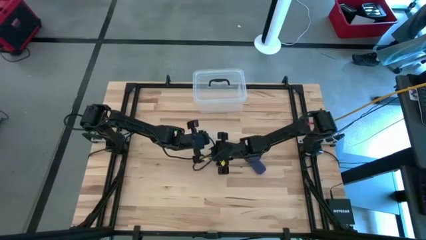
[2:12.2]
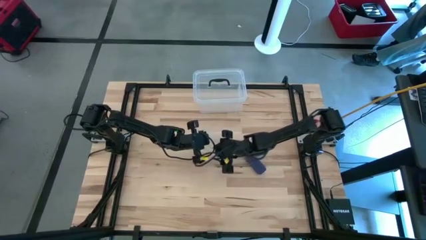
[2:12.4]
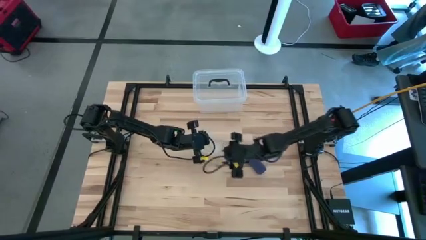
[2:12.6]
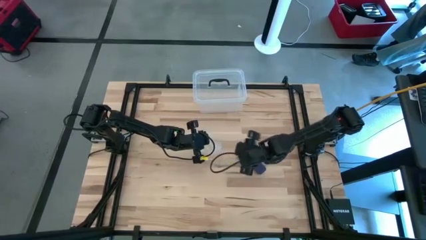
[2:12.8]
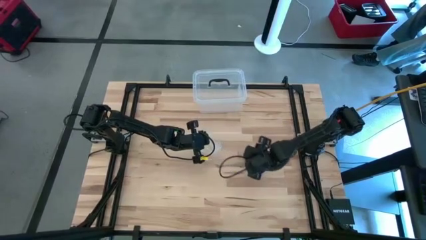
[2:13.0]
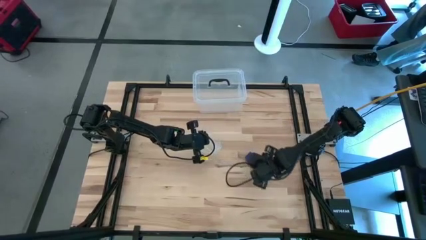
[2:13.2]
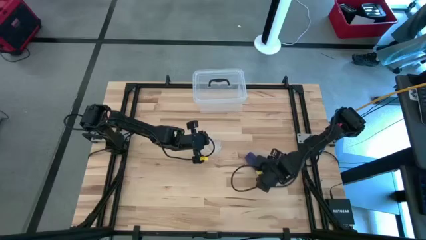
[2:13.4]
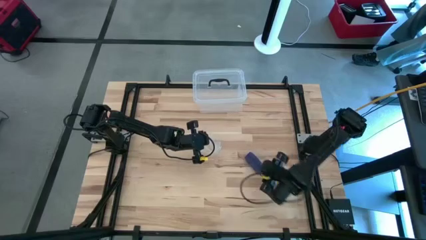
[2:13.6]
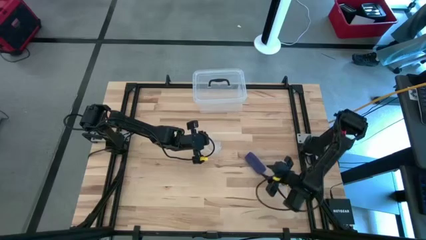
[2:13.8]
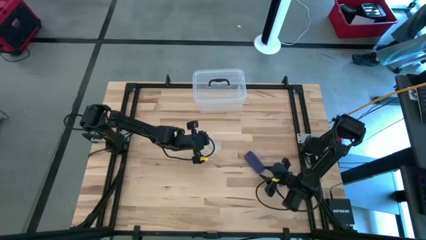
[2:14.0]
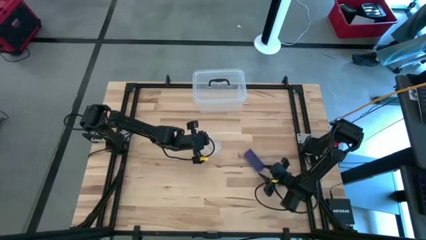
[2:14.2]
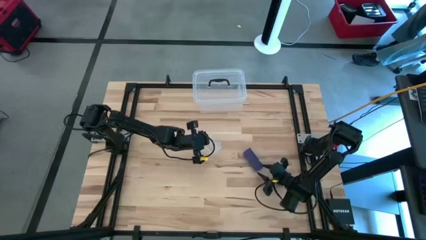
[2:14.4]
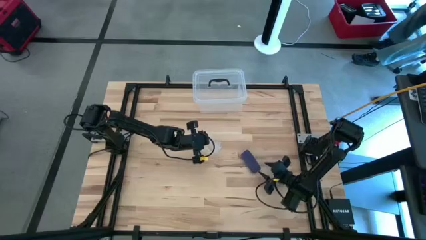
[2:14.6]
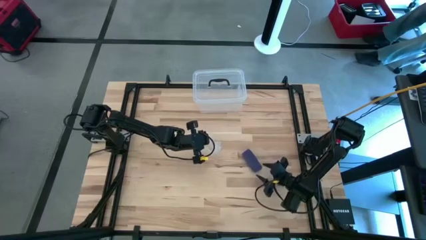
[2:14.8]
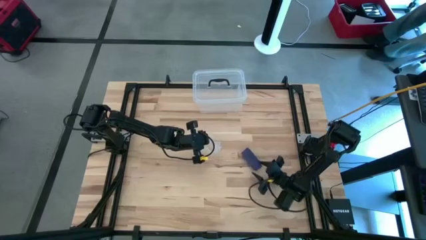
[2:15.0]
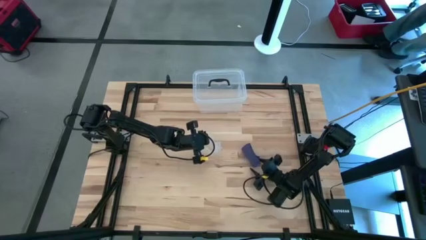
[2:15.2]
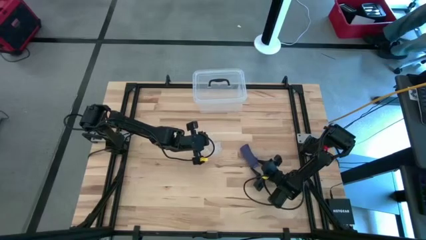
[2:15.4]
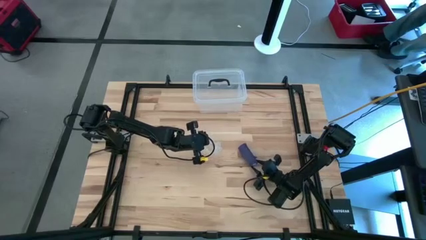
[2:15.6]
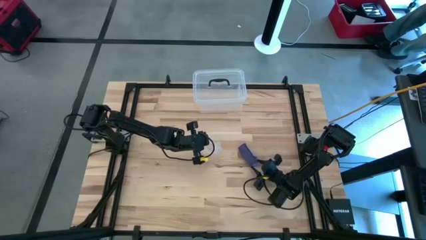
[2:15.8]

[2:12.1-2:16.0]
Task: Roll bandage
Put the violet bandage into the transparent zip bag

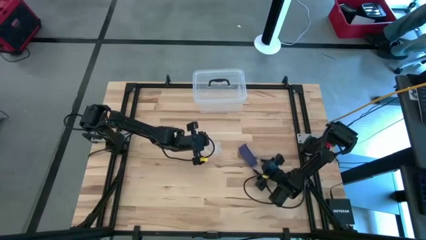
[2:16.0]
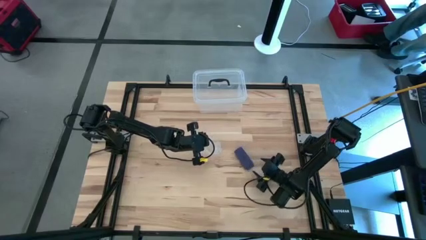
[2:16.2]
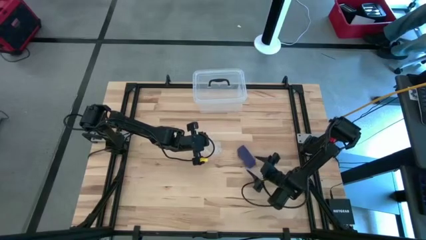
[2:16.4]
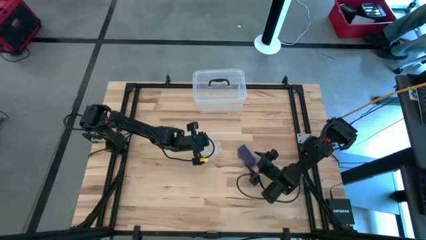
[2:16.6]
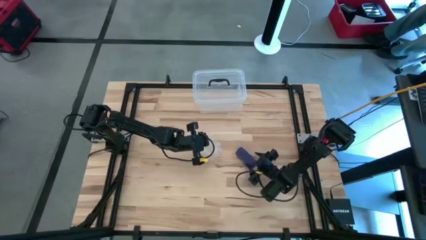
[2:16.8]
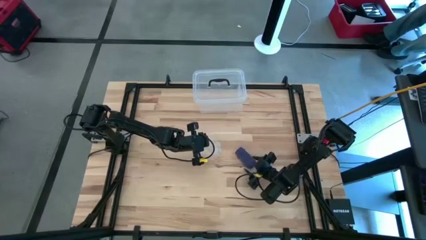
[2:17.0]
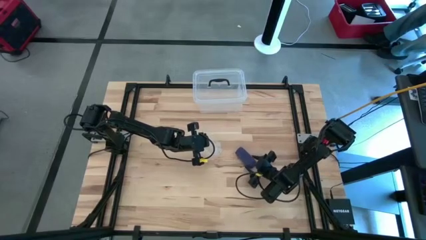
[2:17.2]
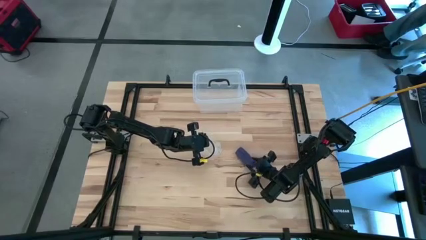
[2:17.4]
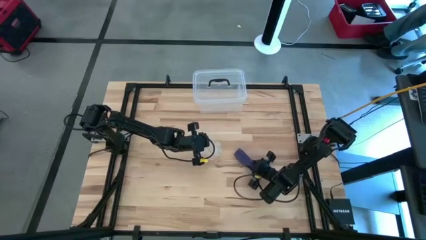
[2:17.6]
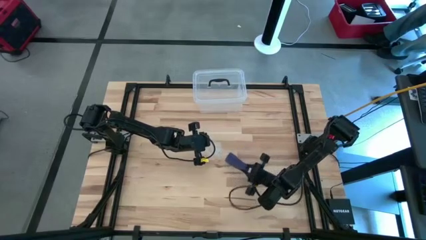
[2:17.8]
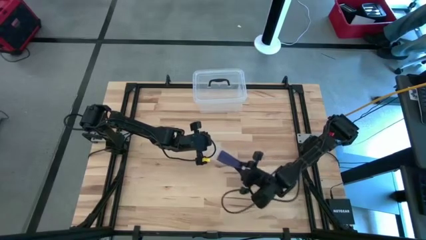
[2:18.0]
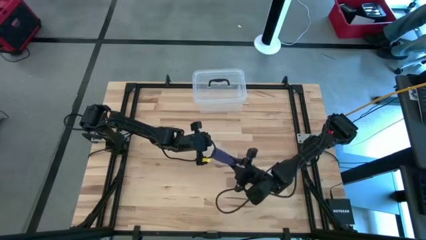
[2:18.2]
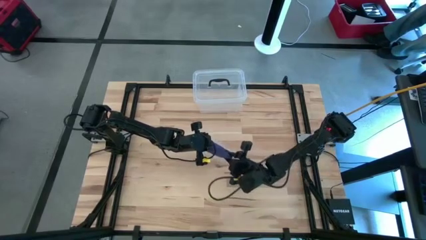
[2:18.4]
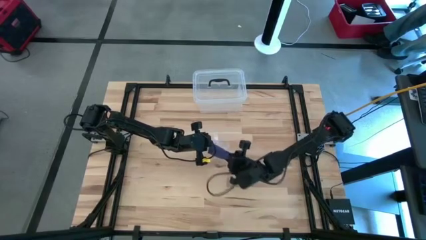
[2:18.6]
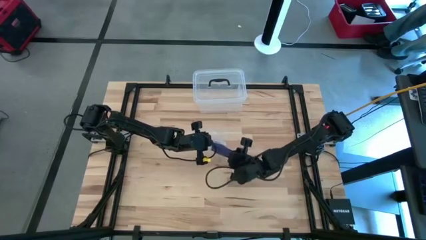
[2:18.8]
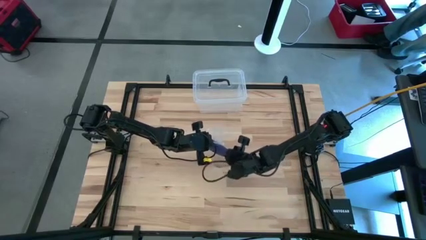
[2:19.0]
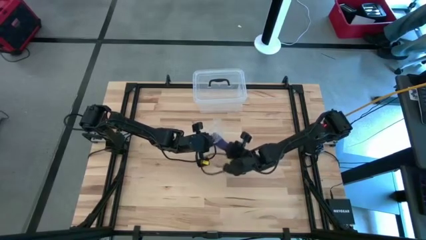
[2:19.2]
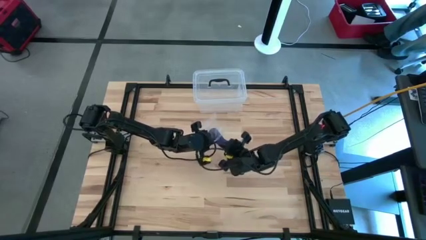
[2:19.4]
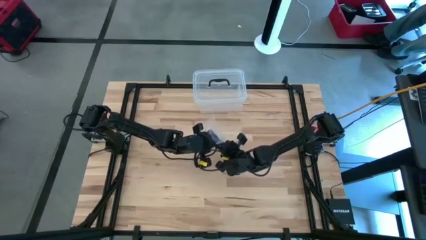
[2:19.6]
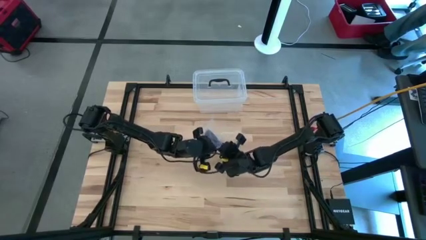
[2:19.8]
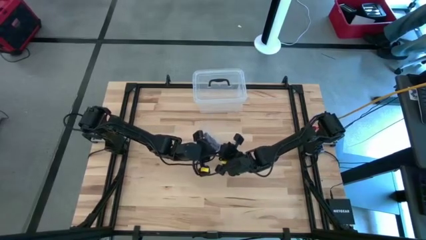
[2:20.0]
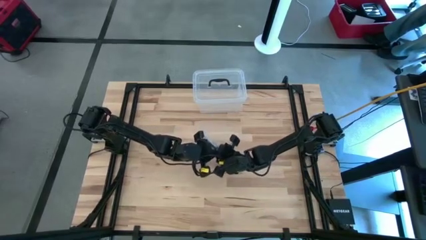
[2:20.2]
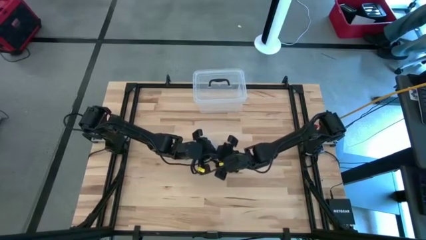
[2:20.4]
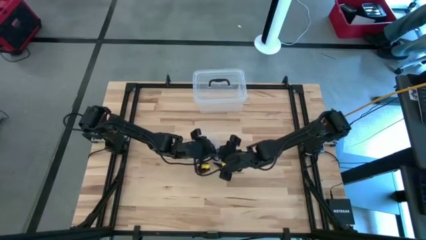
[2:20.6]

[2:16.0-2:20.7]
Put the violet bandage into the transparent zip bag

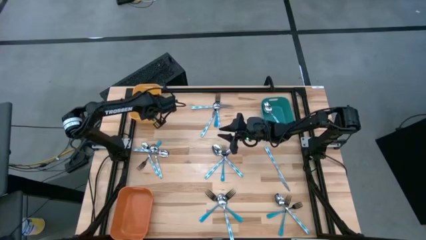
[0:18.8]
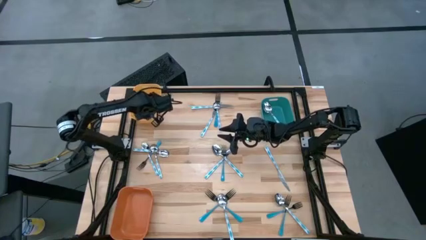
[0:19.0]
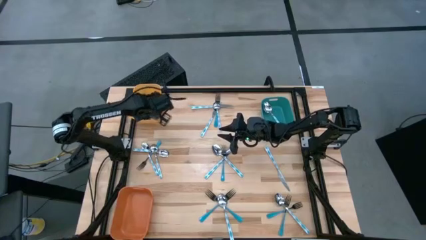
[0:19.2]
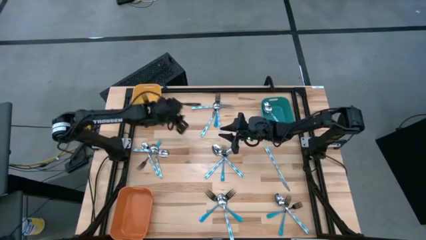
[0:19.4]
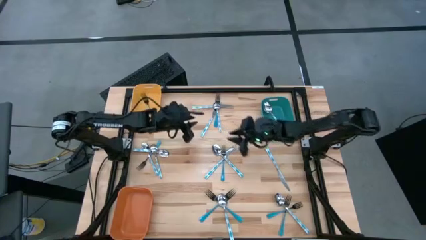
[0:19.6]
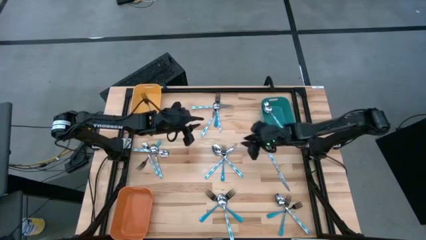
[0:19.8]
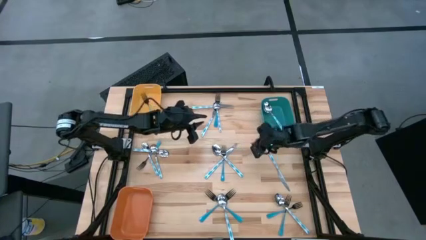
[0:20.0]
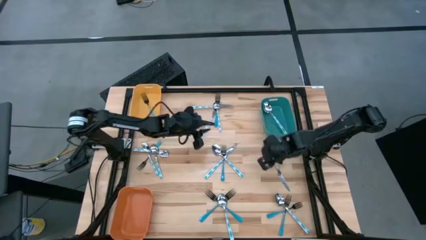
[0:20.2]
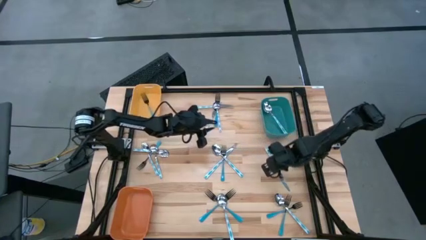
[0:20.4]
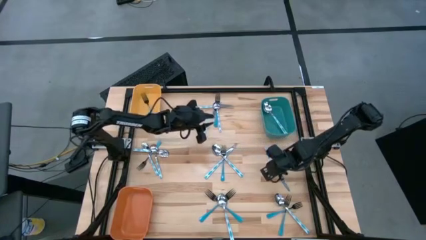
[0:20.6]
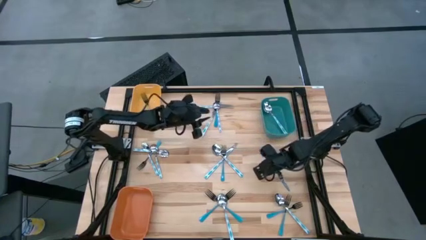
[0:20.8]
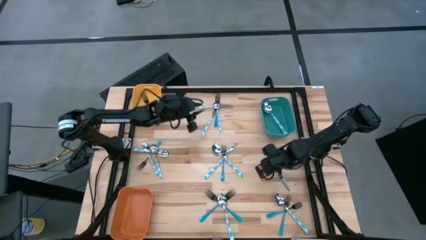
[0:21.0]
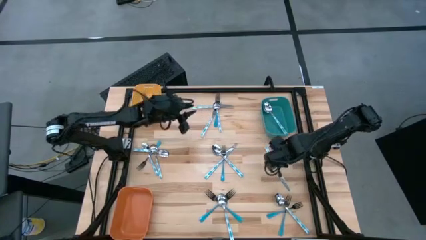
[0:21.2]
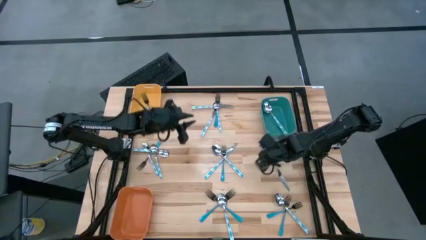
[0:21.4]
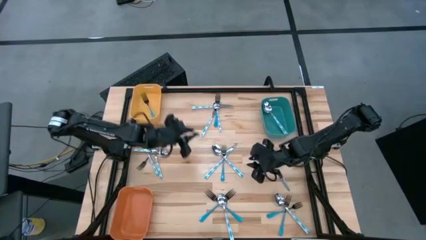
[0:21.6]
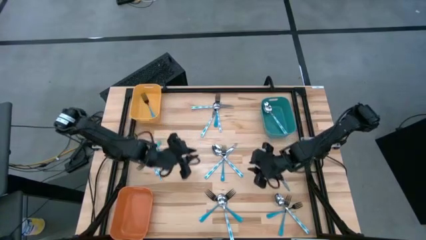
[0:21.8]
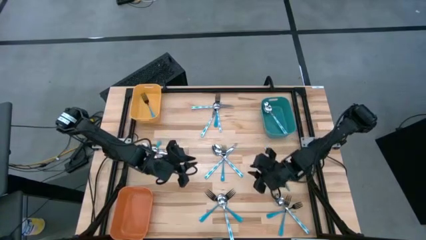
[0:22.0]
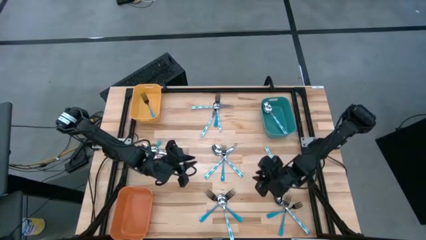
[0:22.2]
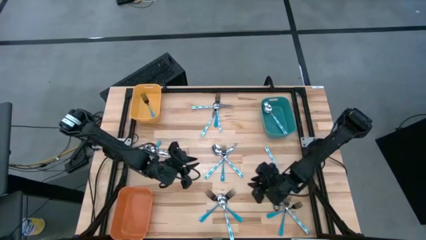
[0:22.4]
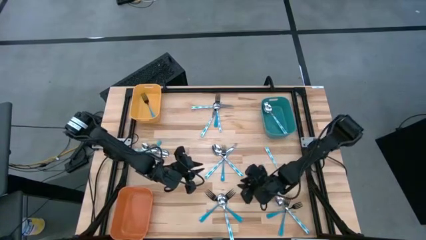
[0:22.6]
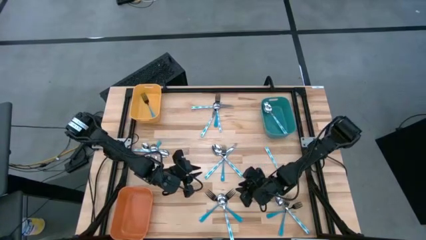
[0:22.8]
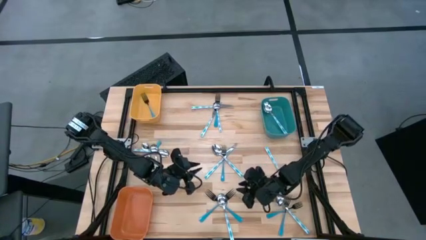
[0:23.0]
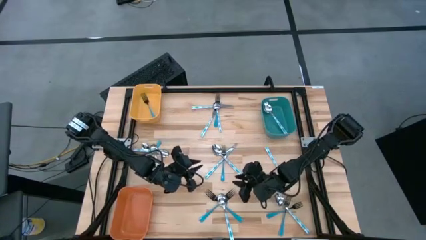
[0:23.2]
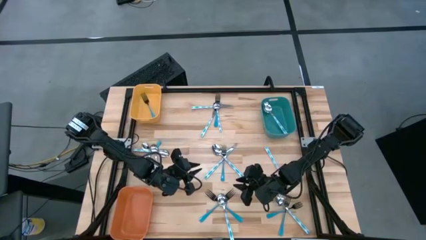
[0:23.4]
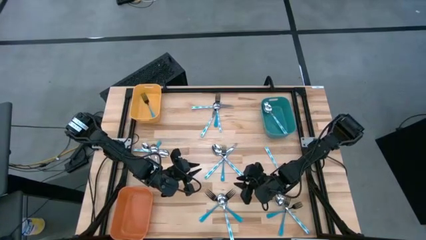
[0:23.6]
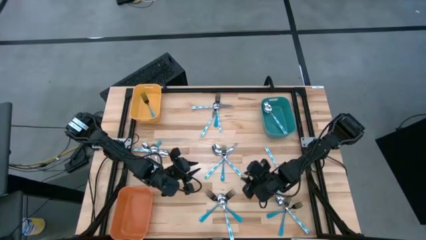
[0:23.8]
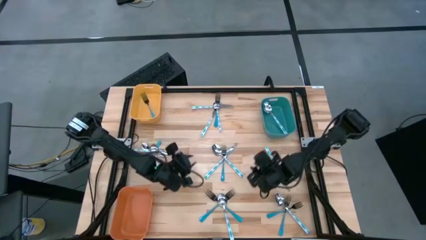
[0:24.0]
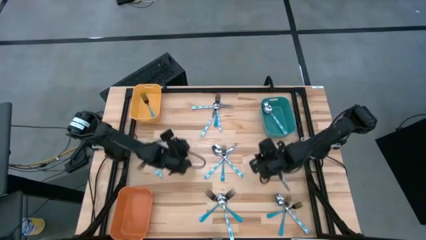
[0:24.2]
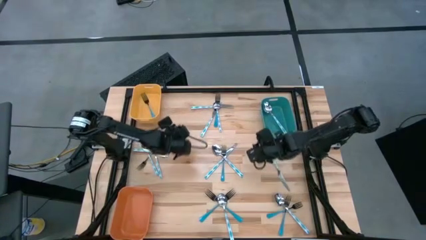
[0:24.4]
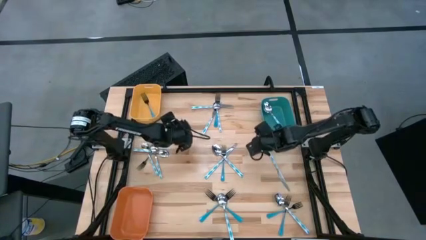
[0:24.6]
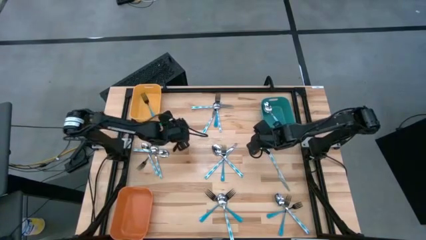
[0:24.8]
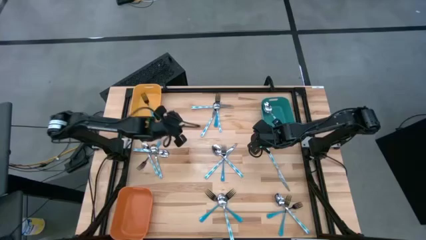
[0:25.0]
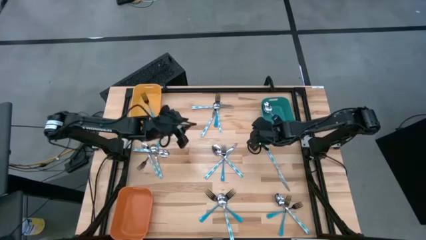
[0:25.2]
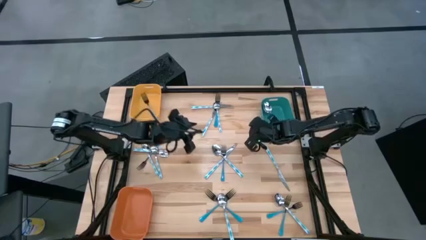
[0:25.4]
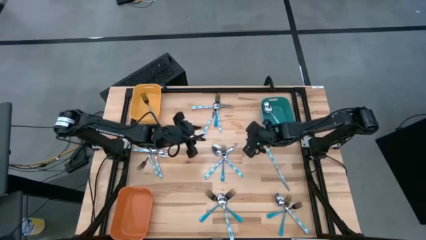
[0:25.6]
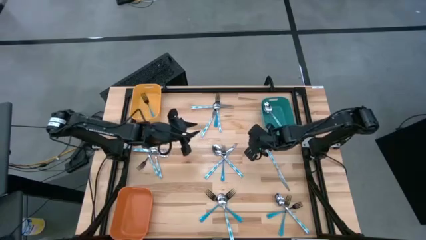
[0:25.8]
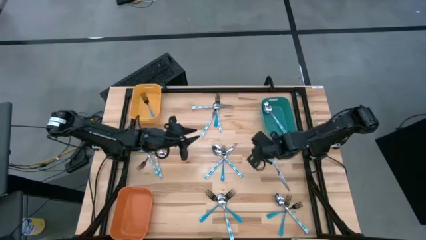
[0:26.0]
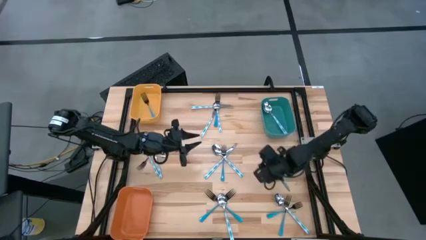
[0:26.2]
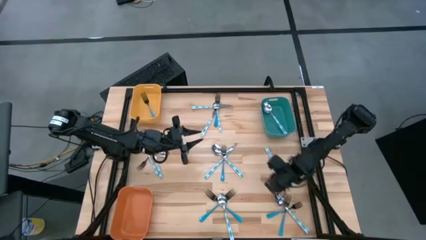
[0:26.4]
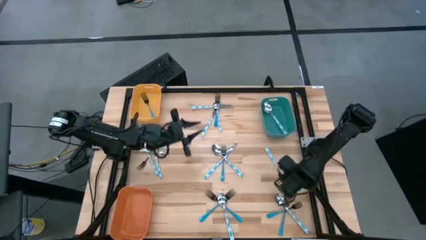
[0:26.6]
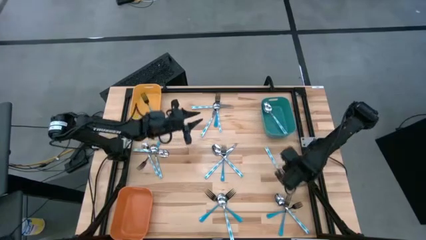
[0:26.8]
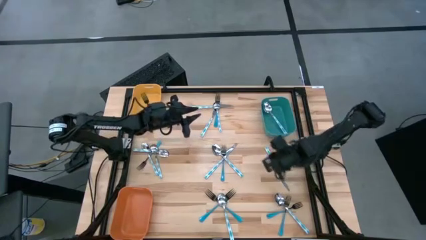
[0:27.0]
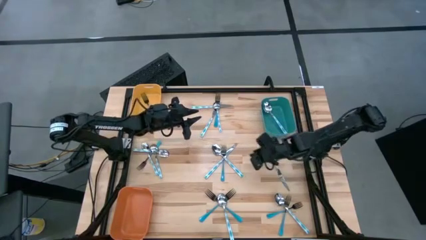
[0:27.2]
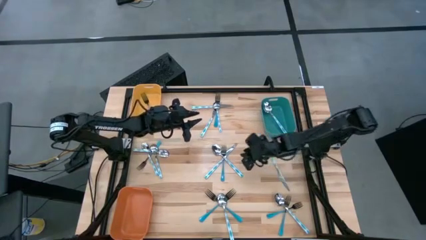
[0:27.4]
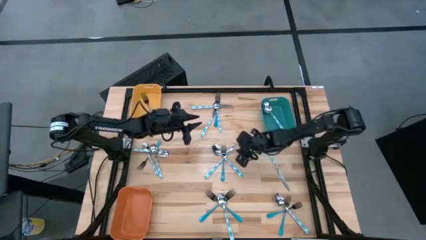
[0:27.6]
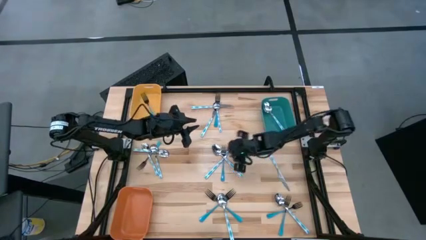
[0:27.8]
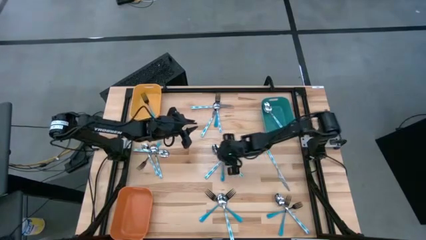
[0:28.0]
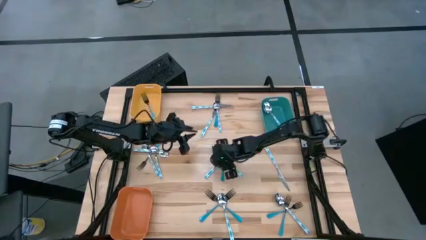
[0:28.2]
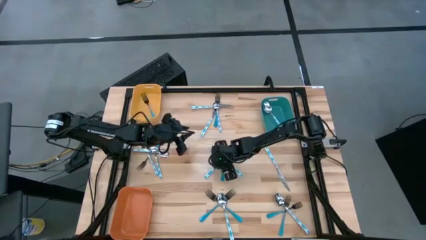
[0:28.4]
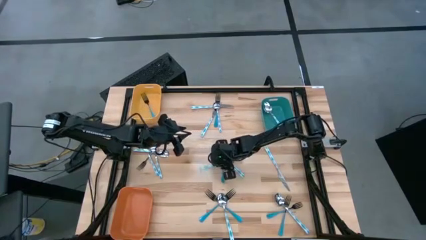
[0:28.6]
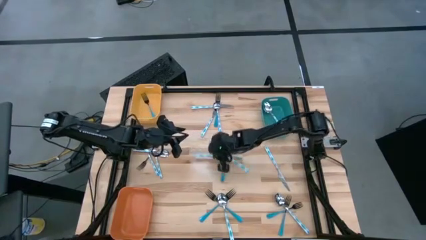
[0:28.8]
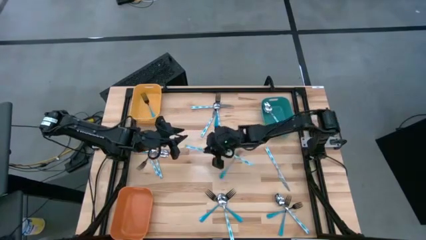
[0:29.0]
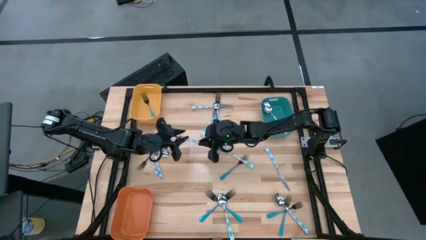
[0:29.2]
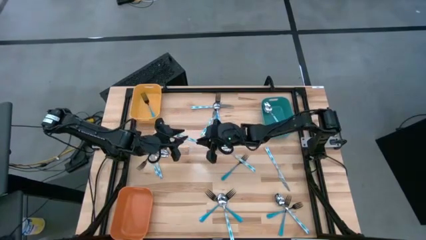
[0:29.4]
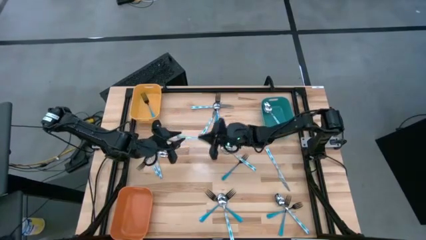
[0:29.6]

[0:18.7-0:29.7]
Task: Sort silverware by color (type)
Put the white-blue table knife into the orange bin
